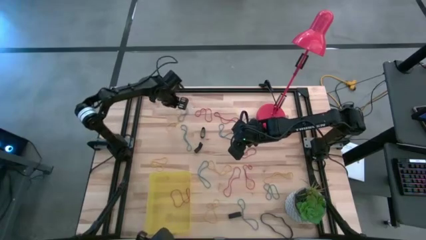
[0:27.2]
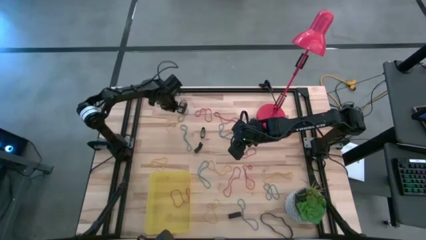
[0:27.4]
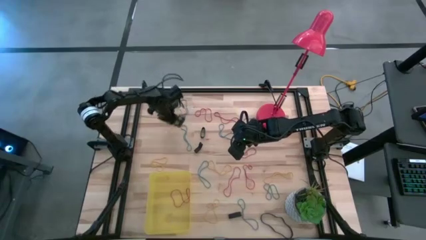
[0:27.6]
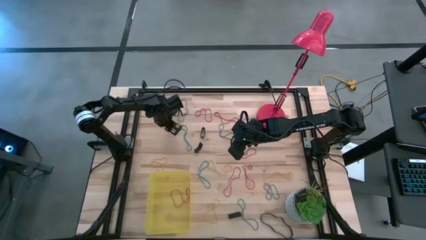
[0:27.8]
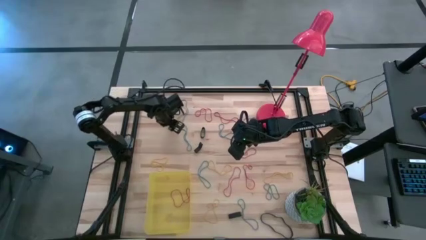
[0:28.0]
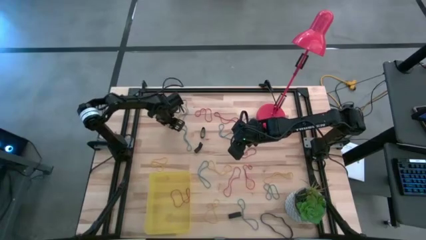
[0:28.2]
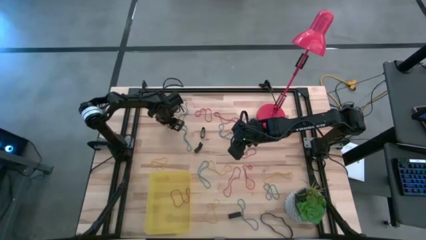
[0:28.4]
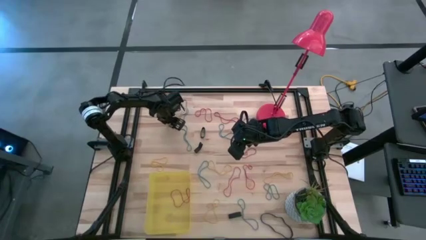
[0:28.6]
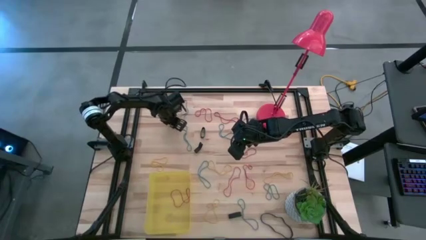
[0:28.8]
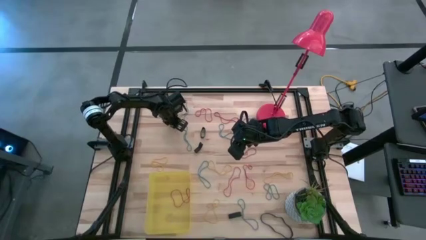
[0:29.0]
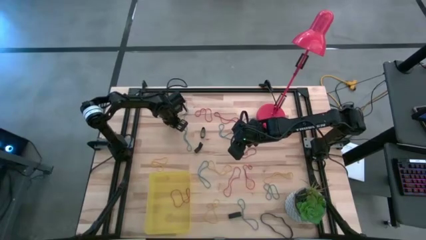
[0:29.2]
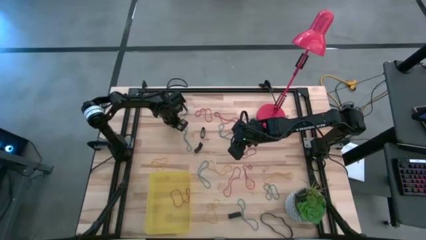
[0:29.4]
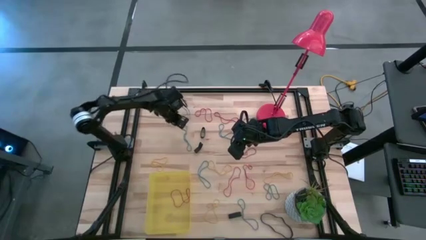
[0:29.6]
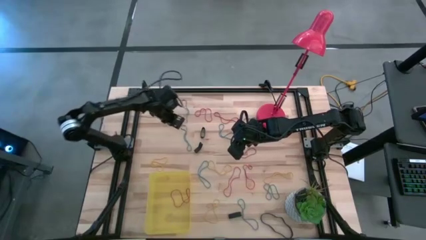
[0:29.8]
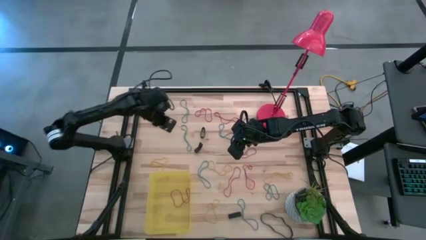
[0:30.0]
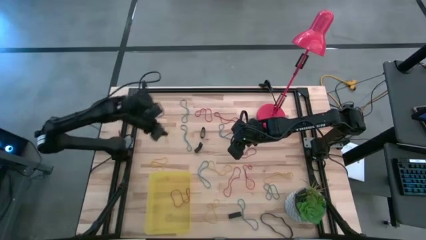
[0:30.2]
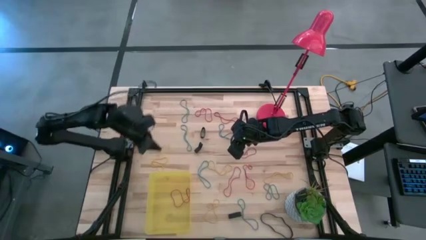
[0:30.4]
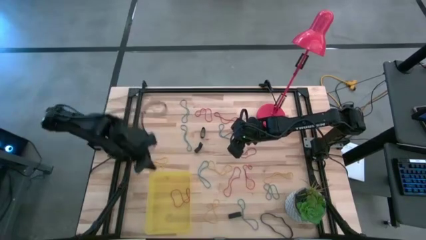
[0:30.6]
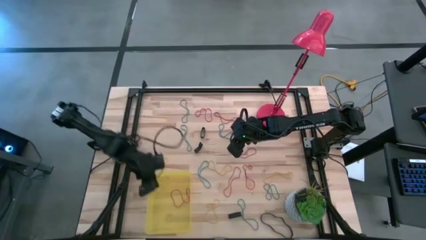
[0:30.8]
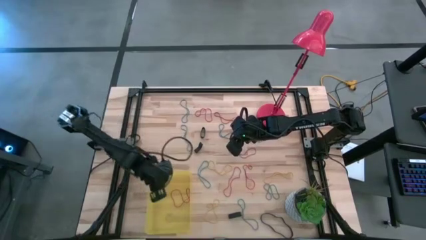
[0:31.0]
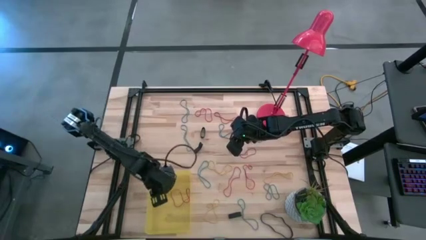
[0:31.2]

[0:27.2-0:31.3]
Task: Pick and place rubber bands into bin
Put the yellow rubber band into the bin

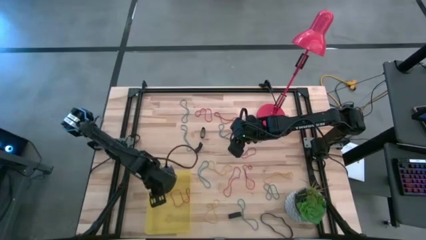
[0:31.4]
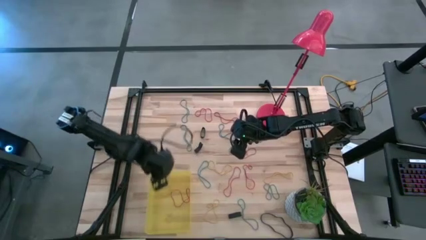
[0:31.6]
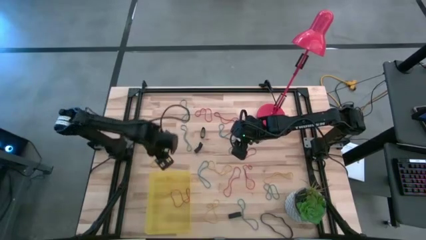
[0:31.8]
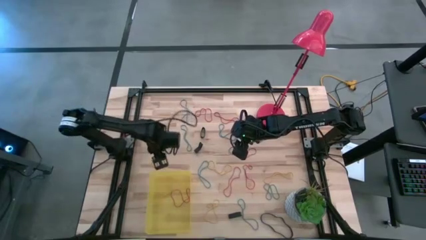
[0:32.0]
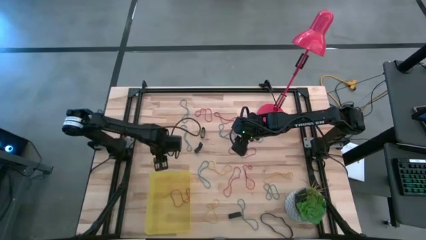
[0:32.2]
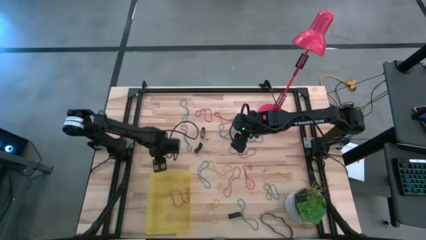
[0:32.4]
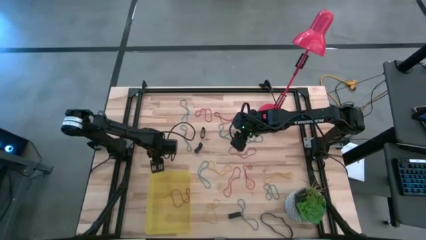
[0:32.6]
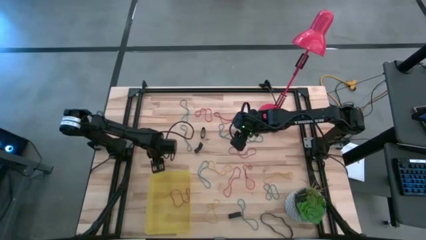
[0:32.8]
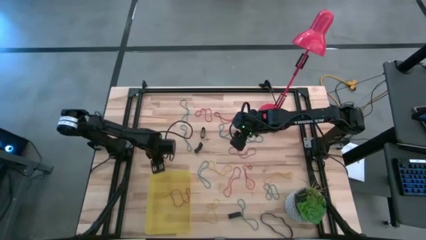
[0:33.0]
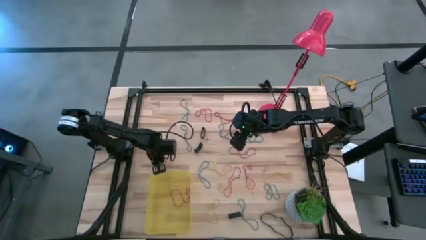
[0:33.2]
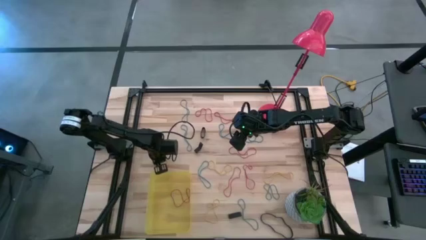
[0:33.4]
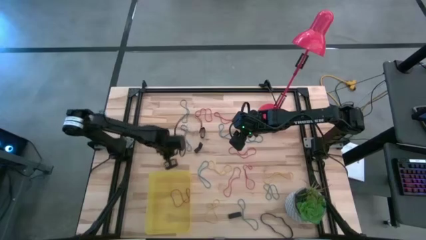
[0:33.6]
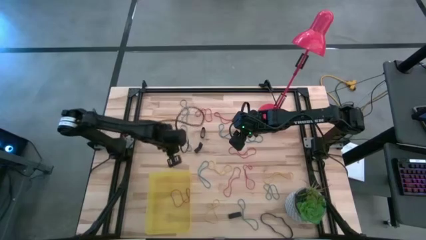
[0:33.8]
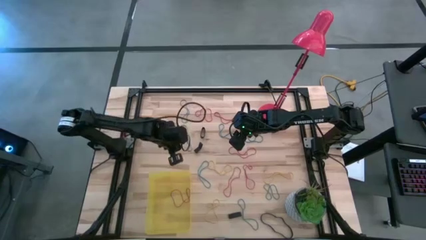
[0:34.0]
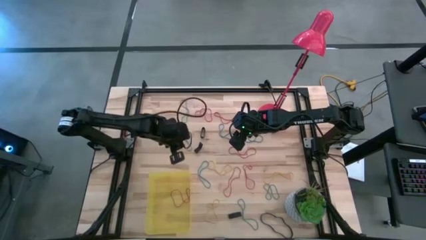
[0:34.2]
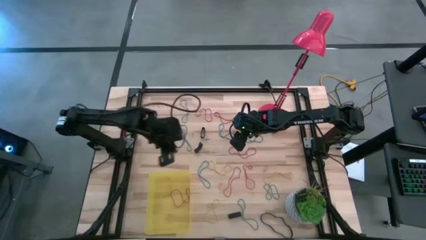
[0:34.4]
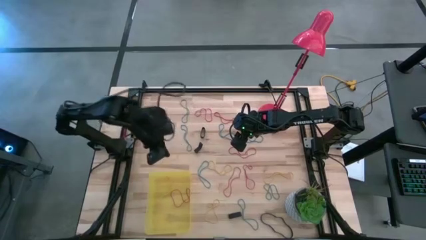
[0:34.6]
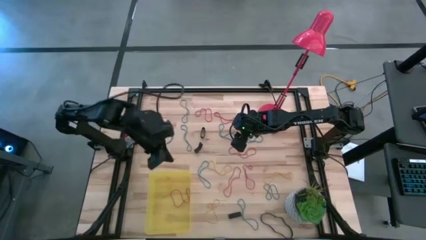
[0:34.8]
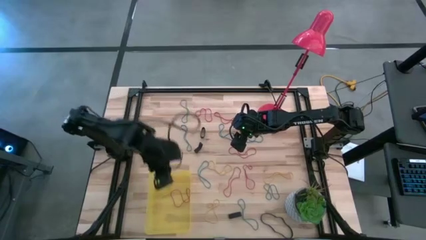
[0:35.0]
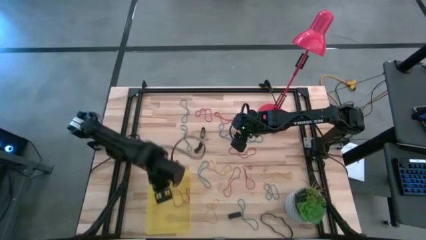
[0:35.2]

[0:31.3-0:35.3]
Put the yellow rubber band into the bin

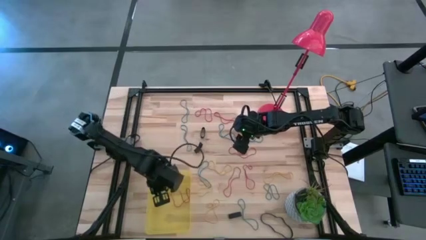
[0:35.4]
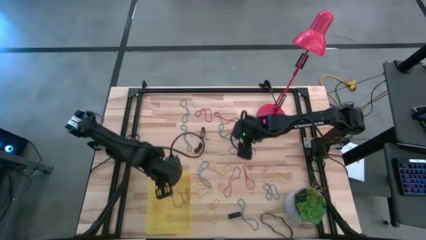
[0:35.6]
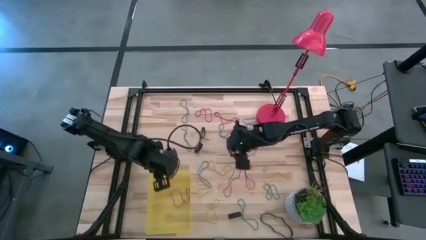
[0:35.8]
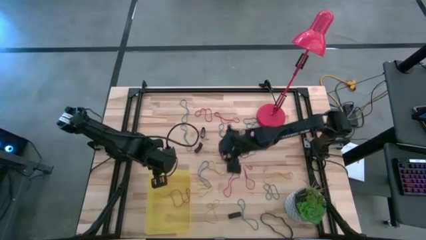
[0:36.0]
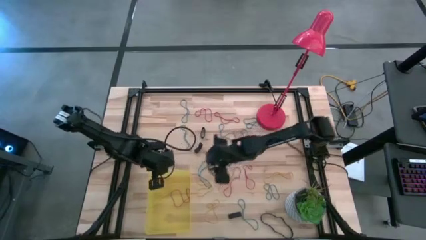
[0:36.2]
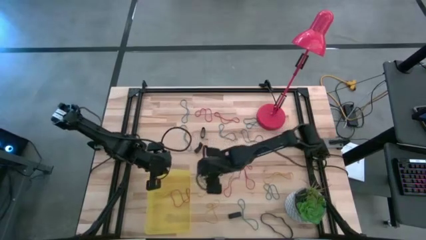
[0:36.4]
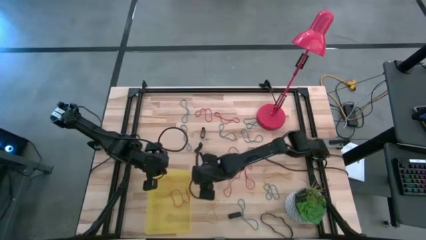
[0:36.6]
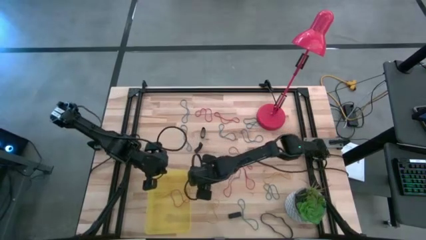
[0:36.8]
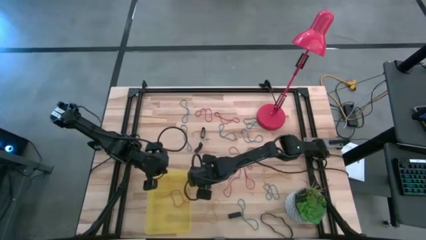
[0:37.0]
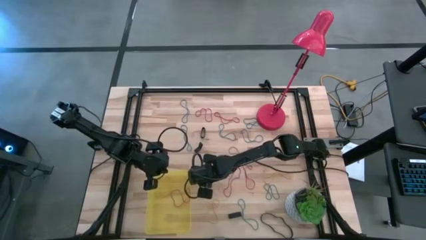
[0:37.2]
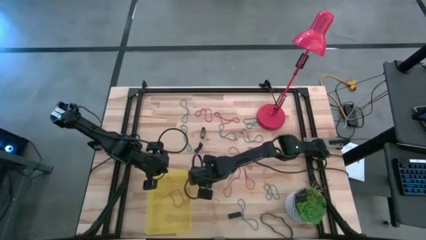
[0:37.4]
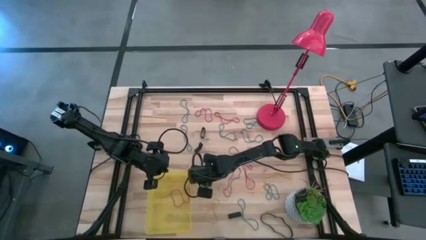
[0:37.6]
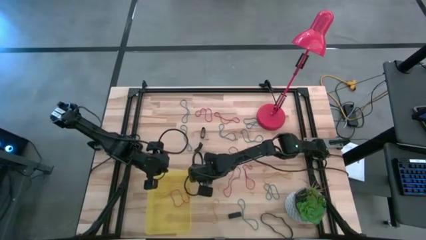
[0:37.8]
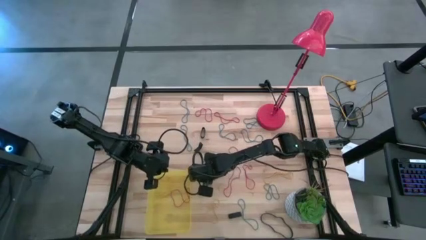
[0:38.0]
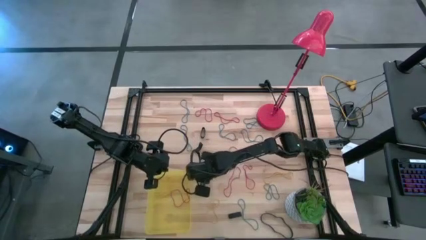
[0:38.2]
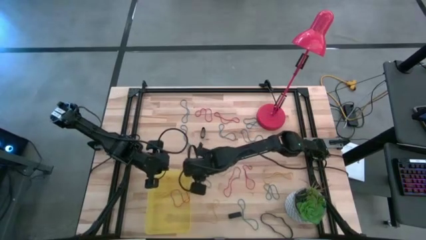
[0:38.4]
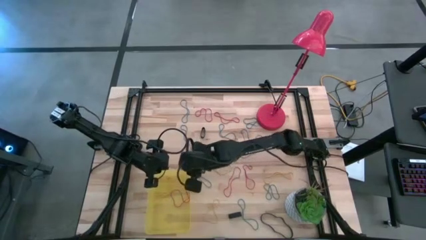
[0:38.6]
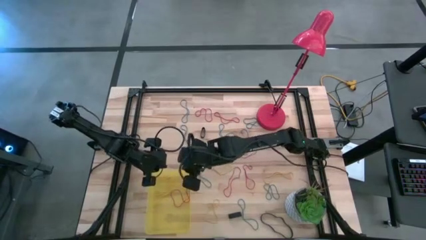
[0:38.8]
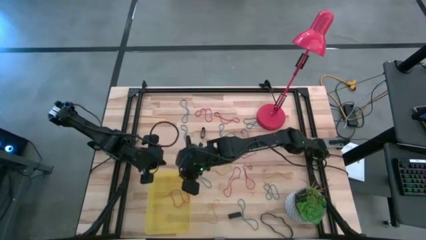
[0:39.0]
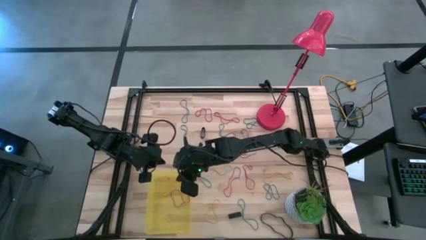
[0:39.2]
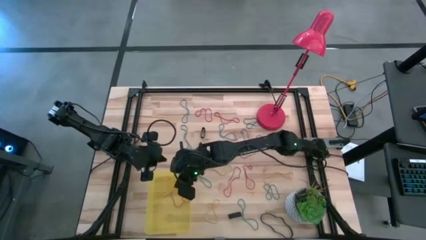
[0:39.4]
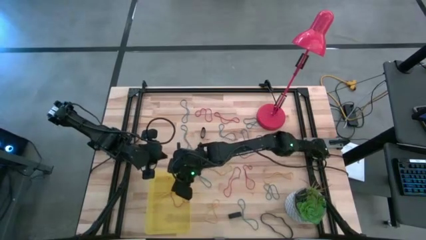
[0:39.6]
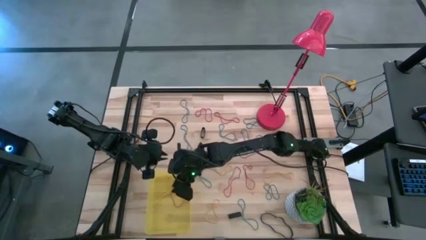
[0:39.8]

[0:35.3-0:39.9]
Put the yellow rubber band into the bin

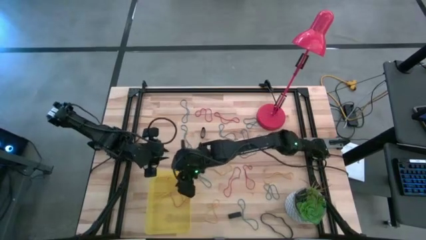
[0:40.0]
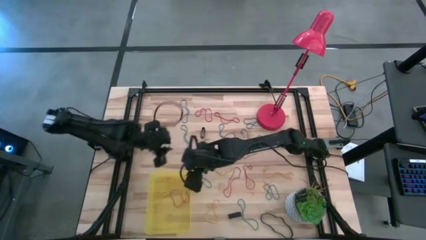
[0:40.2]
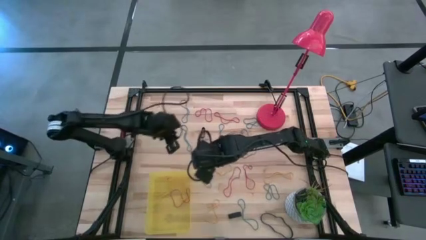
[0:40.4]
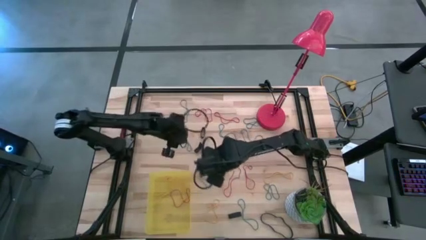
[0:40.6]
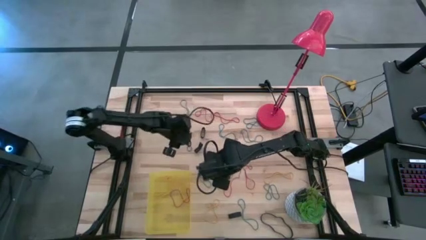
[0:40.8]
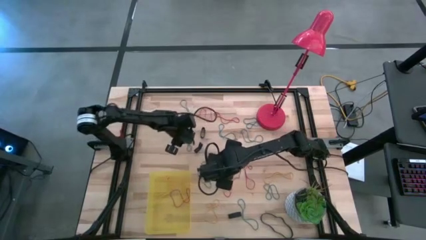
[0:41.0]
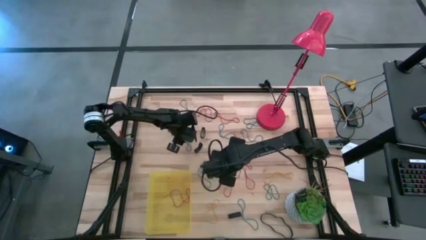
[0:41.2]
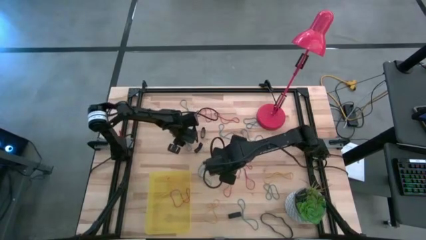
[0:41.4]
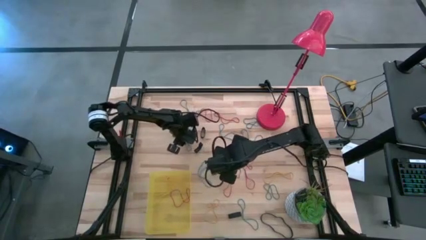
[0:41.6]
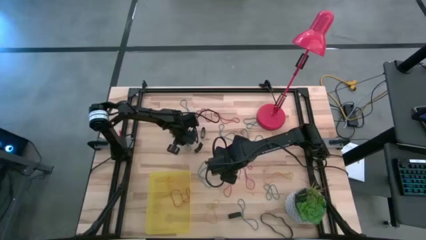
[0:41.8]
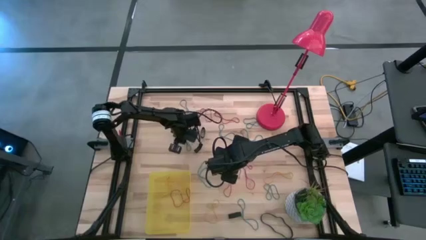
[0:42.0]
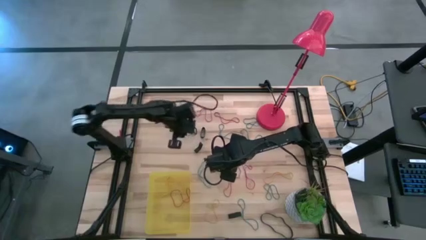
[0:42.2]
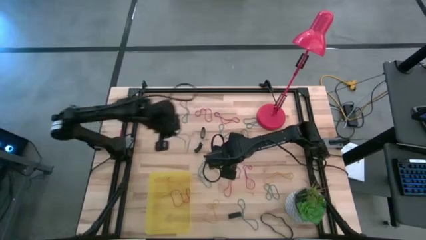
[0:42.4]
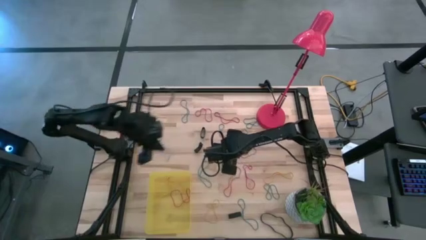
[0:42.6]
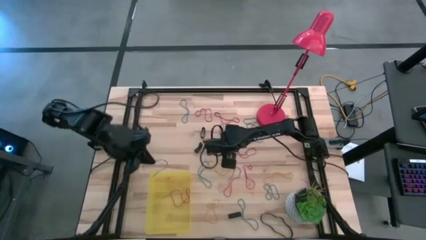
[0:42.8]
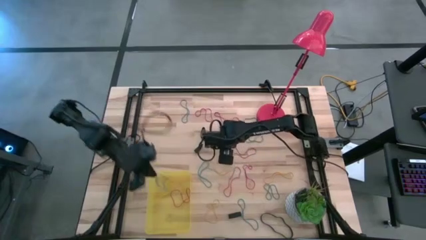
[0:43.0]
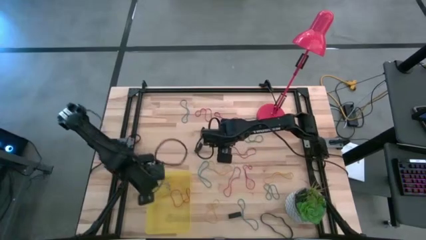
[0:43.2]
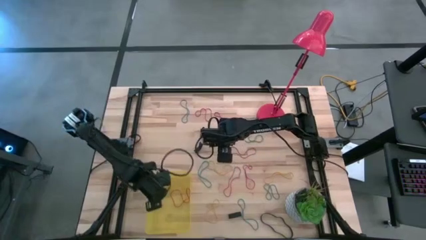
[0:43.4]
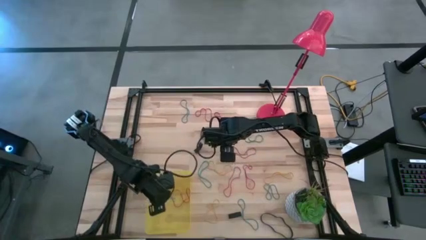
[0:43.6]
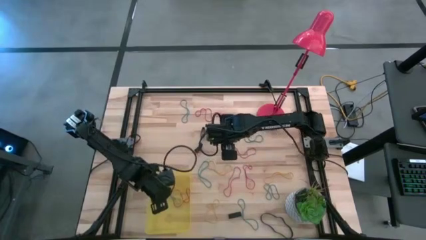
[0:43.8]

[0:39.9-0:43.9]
Put the blue rubber band into the bin
